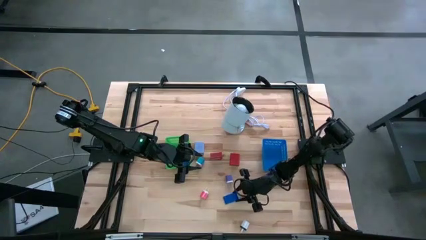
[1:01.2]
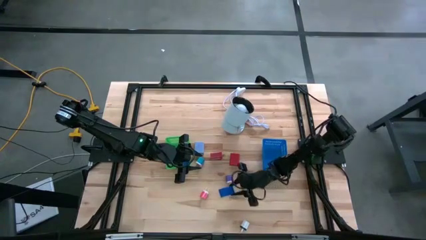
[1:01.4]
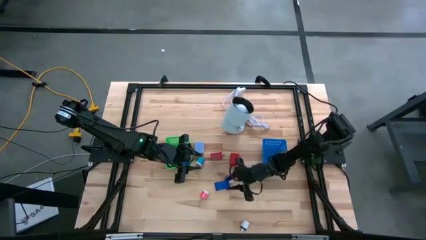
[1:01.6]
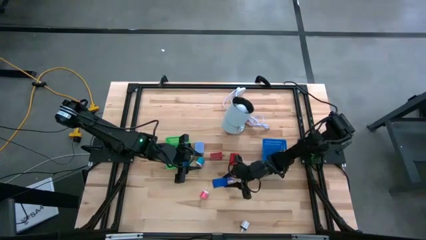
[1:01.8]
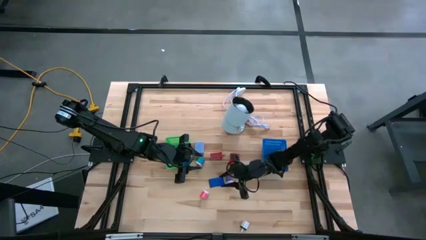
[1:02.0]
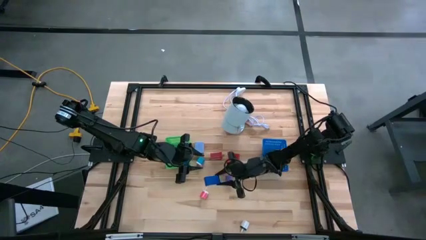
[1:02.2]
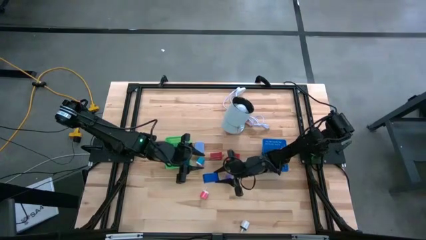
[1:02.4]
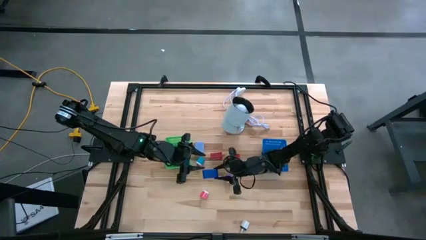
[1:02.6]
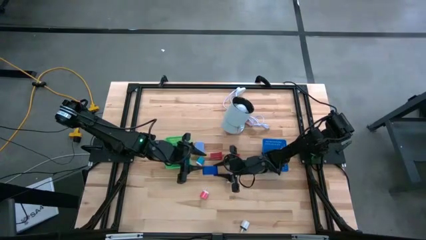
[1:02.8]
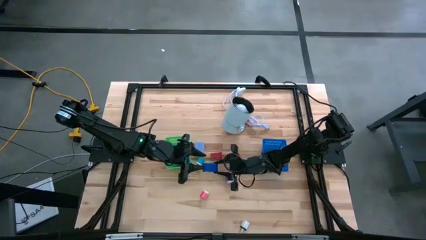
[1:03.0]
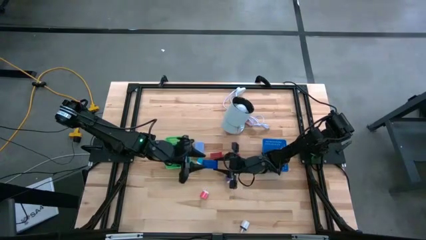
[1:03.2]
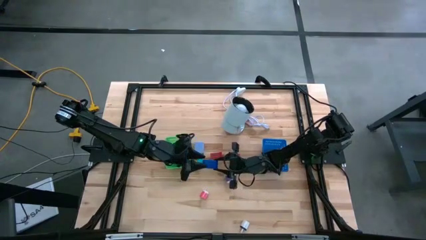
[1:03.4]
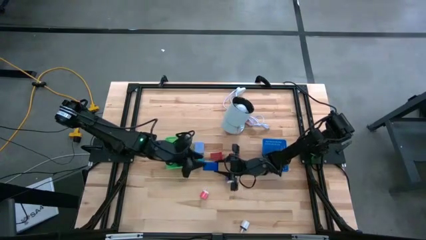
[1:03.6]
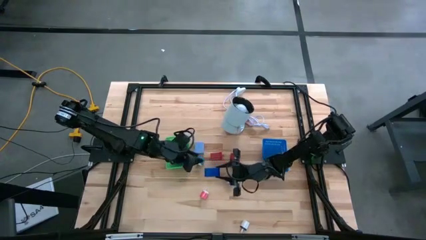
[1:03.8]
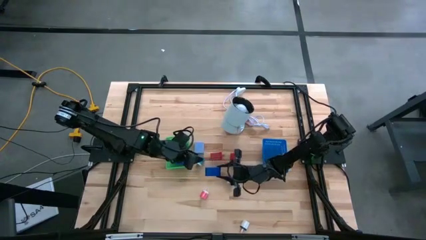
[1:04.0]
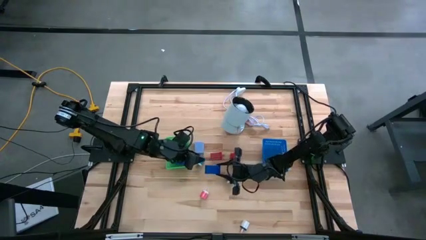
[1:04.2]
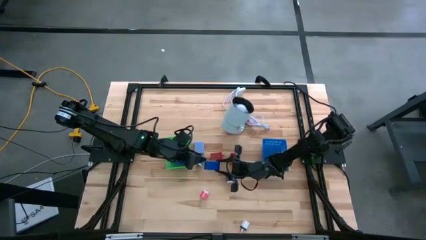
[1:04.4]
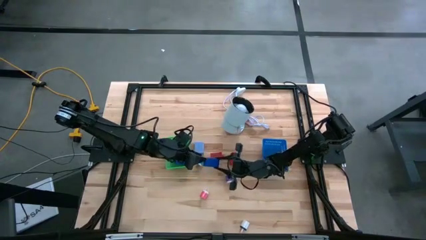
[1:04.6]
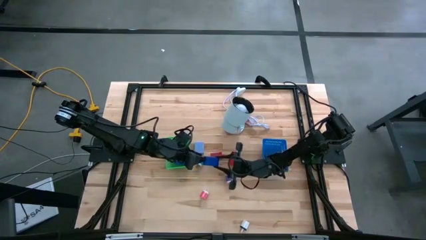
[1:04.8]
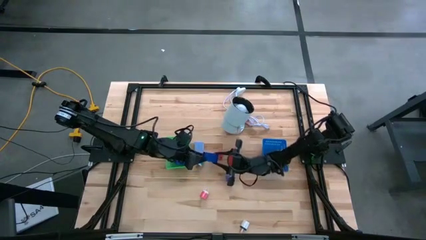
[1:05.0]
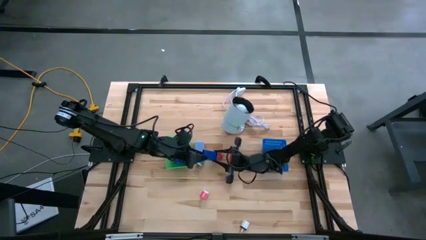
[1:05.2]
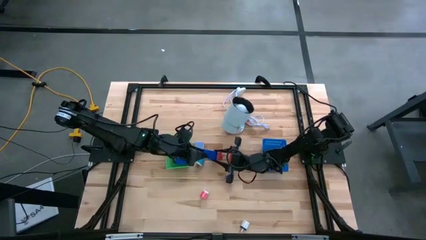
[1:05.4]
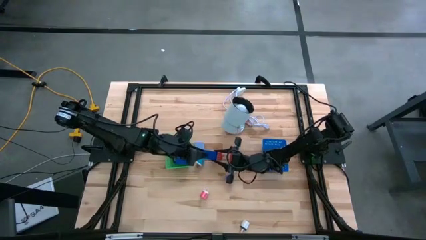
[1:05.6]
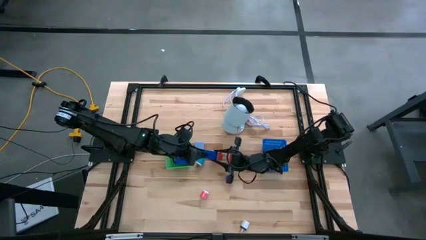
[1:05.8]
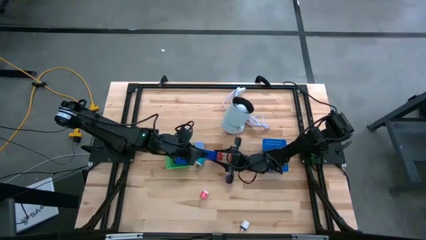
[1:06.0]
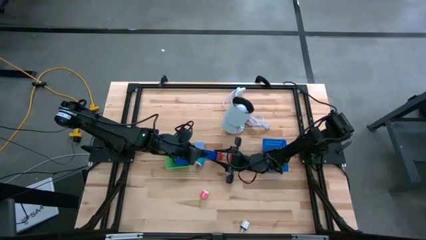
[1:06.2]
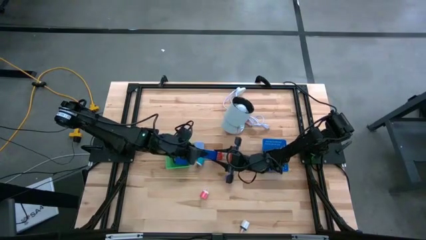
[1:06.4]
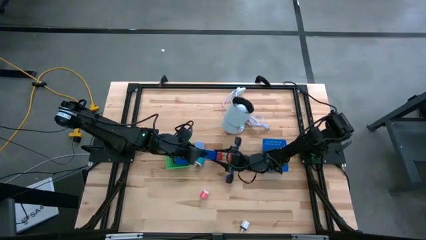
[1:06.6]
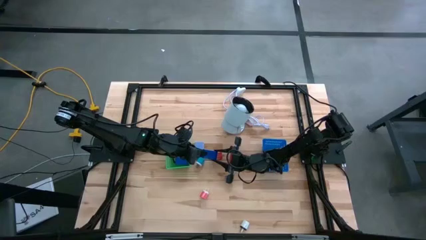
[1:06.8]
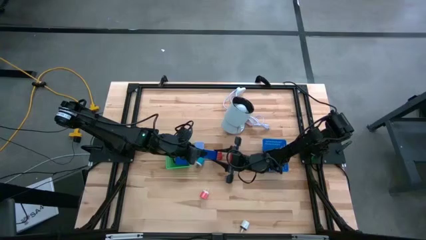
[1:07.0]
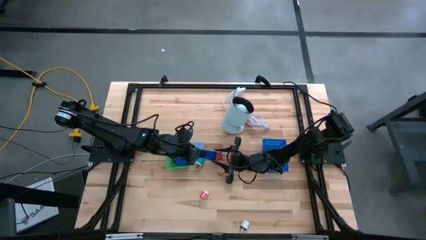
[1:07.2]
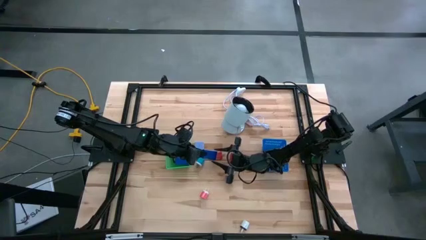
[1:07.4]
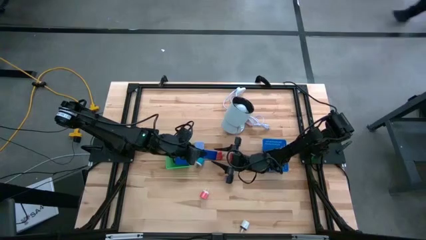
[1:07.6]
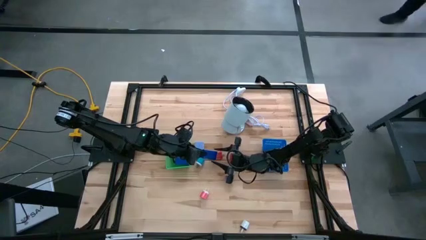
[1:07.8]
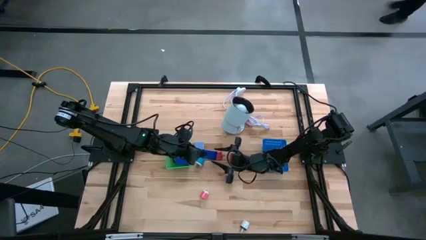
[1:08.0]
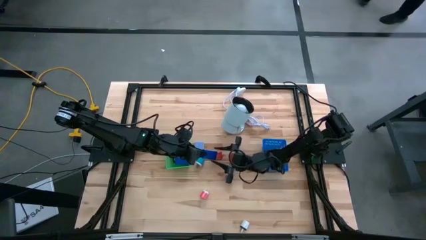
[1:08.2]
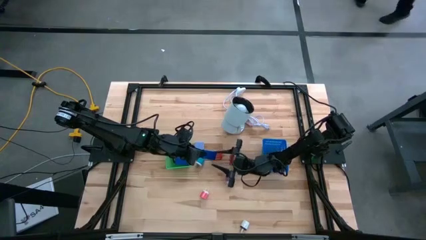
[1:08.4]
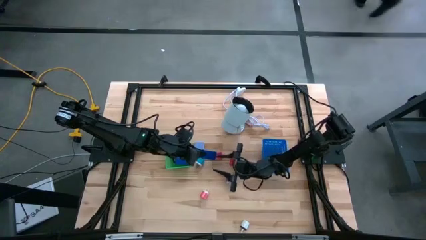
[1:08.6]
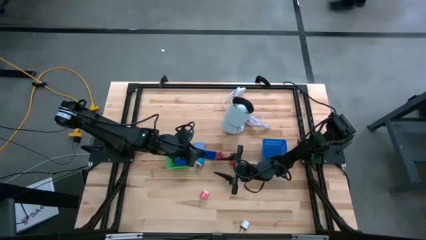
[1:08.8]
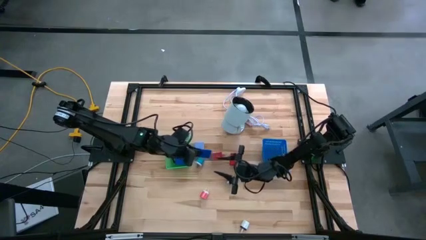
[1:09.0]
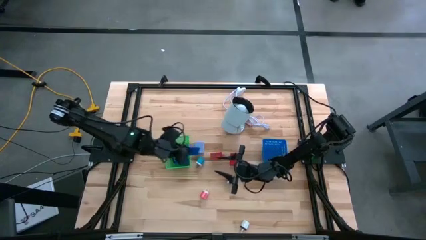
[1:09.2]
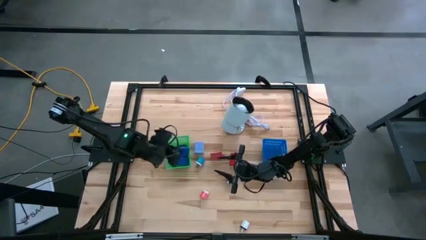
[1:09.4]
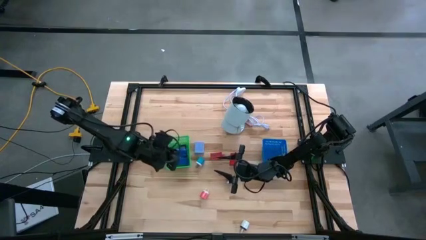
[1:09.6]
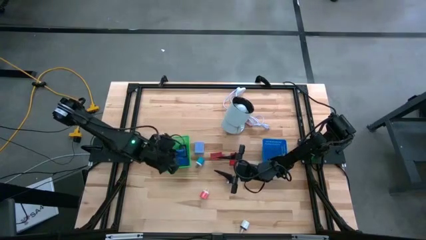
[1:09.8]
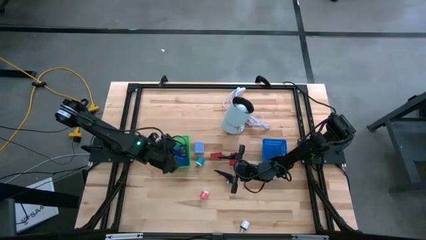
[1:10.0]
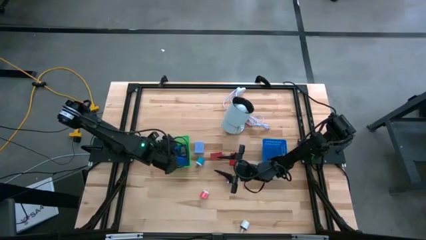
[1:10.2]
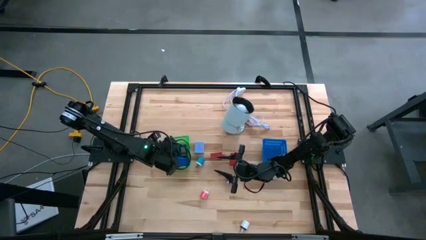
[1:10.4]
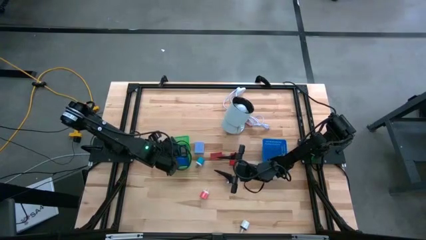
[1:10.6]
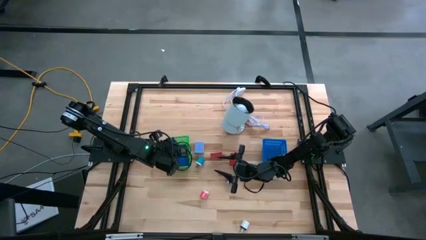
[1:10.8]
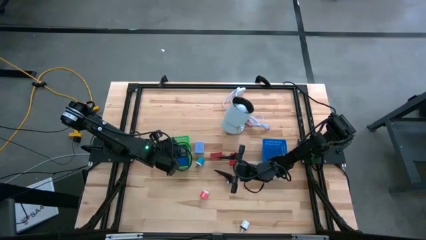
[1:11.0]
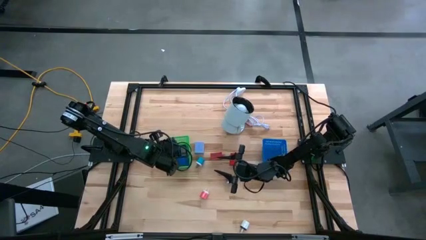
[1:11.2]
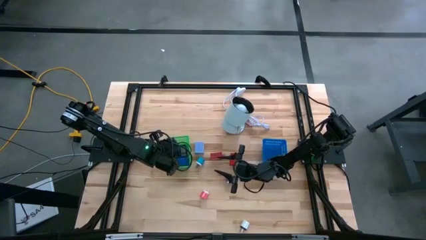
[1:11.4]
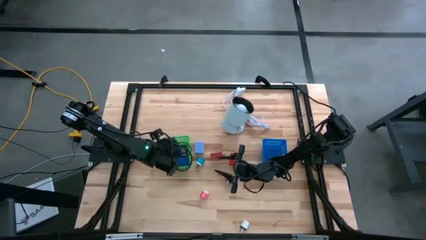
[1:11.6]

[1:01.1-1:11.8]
Task: Pick & Place Office items
Put the blue digital timer into the green bin
